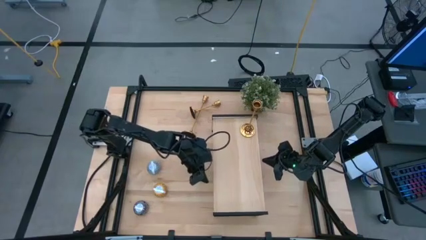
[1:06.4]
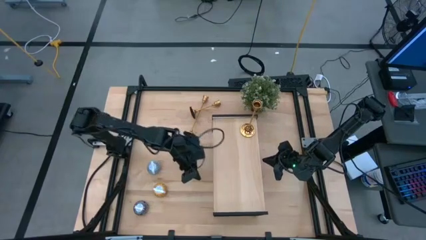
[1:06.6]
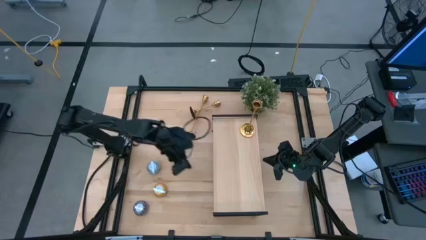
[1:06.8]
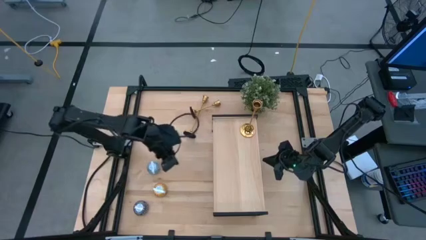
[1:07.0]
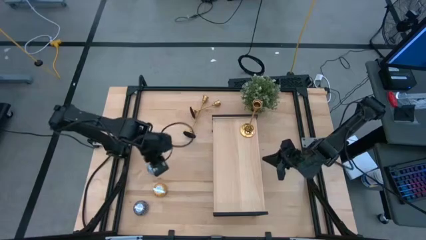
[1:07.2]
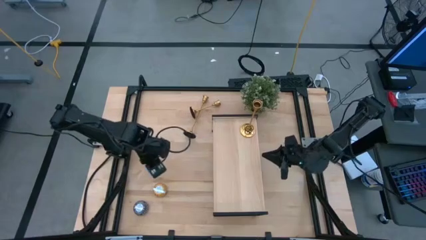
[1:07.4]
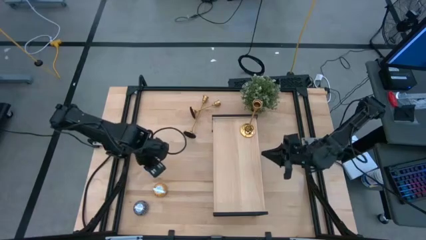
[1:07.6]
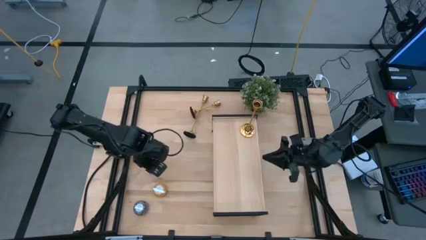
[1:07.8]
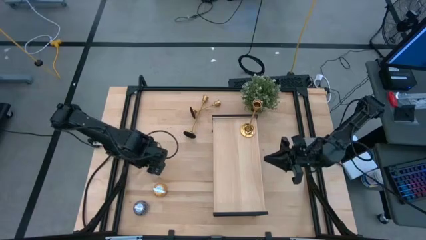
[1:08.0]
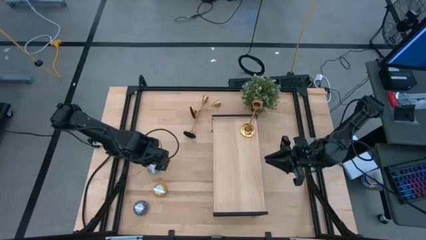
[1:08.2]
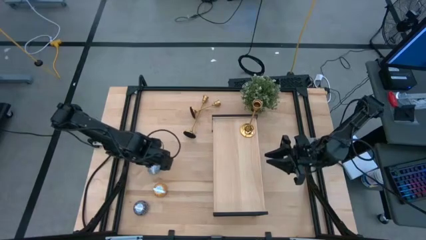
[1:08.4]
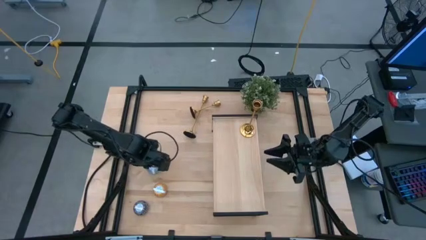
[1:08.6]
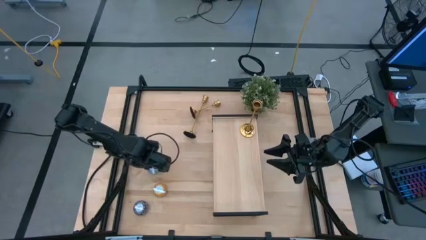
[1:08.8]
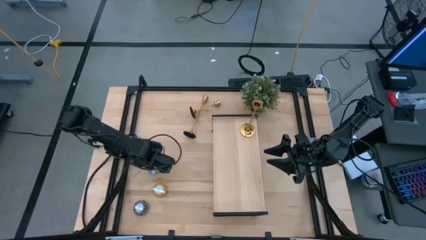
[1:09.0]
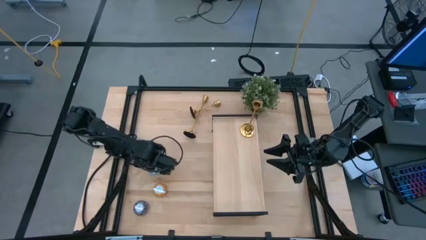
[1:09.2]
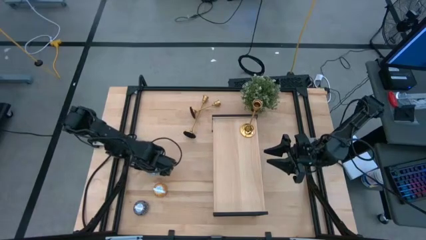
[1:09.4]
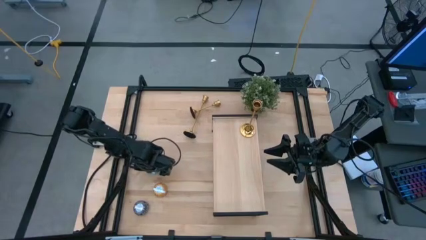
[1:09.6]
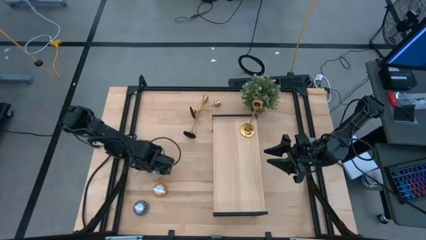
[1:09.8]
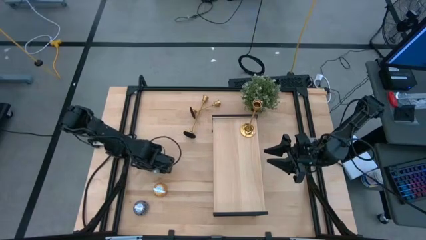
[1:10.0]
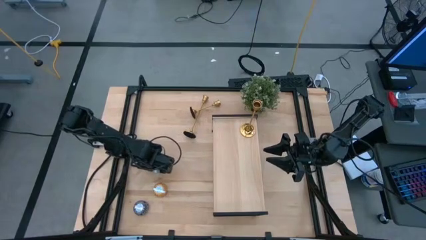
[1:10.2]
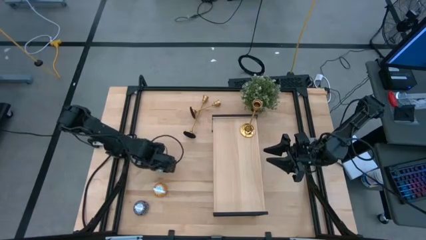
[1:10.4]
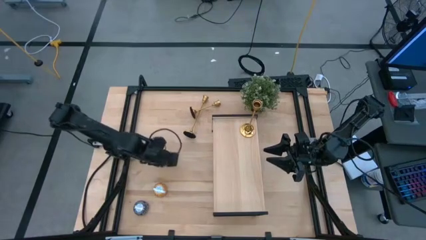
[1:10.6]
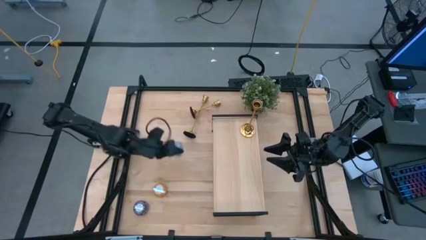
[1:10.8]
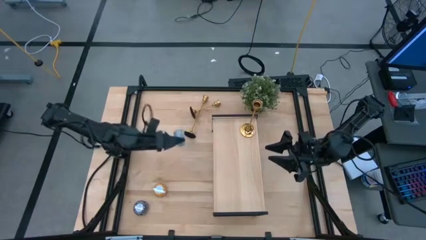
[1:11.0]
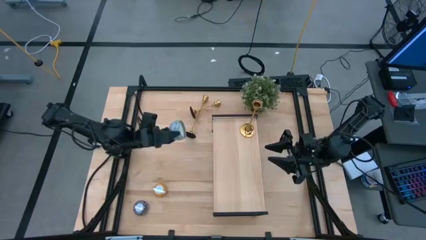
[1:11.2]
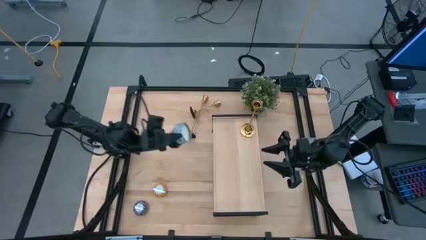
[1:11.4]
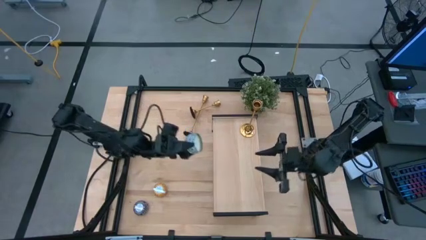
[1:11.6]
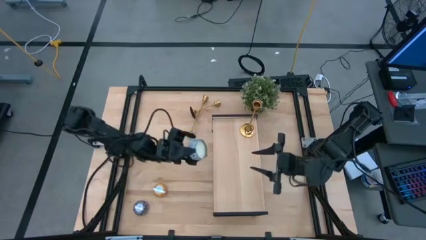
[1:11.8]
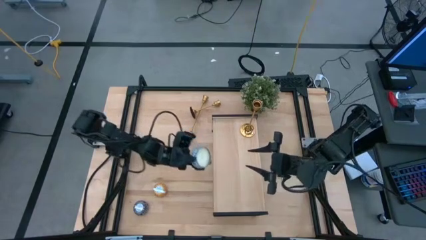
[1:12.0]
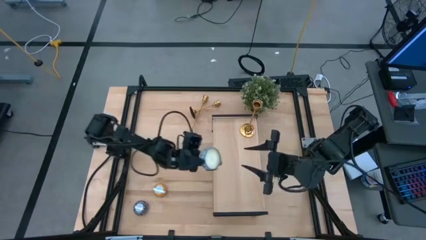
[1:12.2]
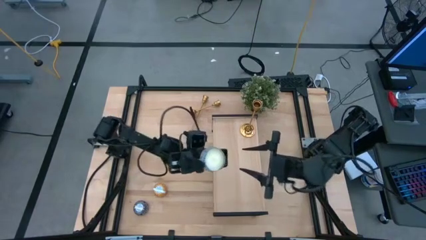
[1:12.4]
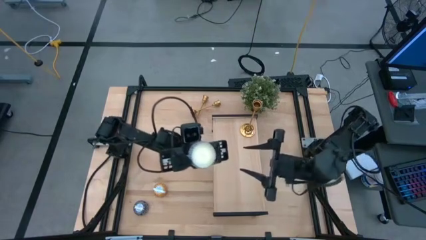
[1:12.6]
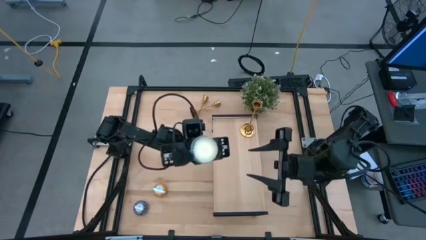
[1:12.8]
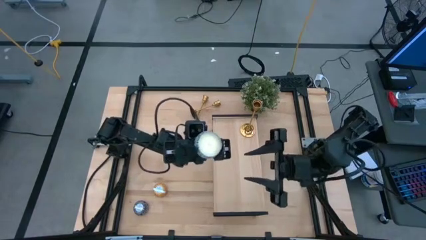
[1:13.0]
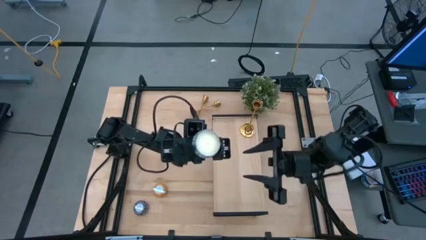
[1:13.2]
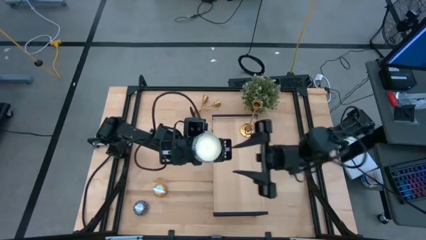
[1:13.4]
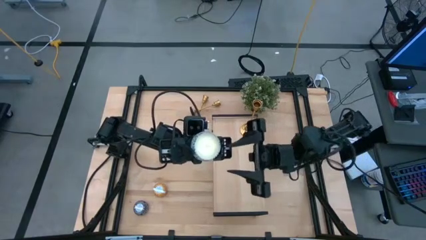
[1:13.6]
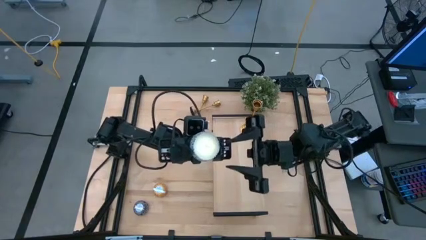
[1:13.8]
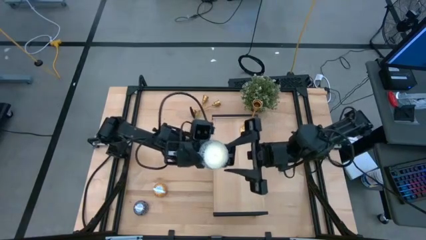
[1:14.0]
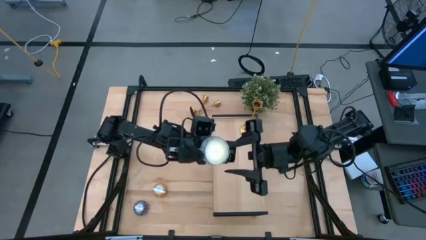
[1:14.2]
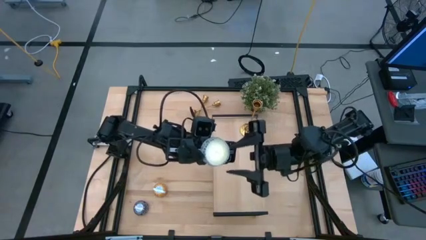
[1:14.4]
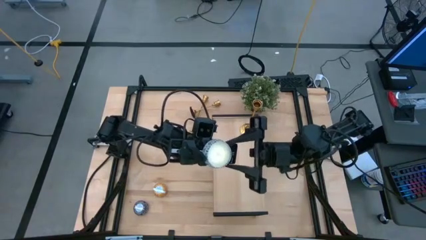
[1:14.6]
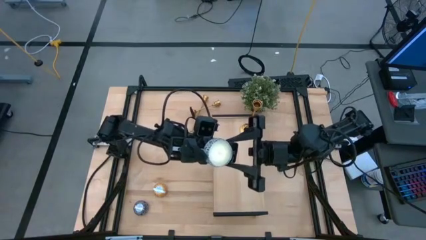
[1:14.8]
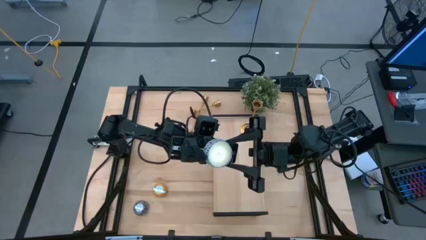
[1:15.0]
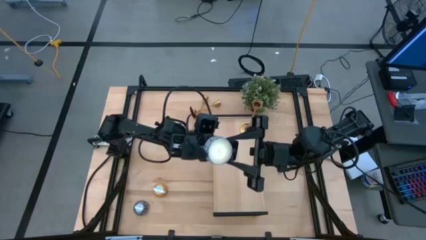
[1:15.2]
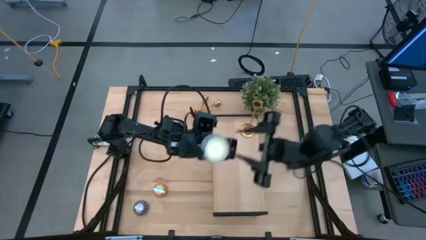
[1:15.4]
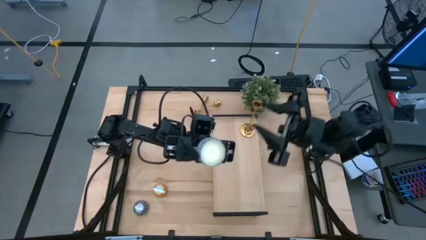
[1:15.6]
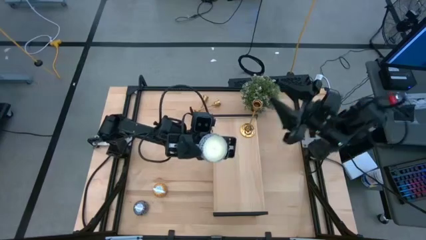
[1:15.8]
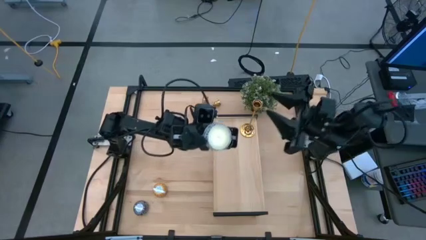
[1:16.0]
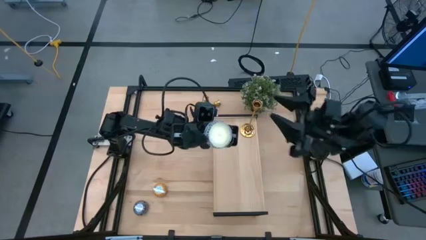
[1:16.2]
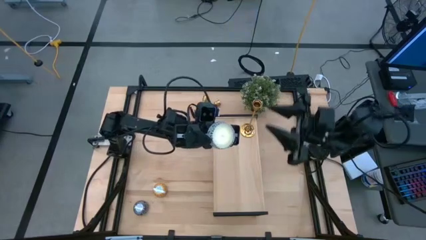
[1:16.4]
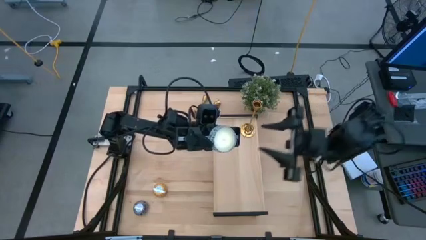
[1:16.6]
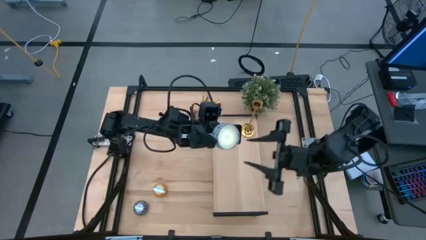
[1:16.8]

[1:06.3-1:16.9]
Task: Pick & Place candle stick holders
Put the green patterned scented candle on the shelf
